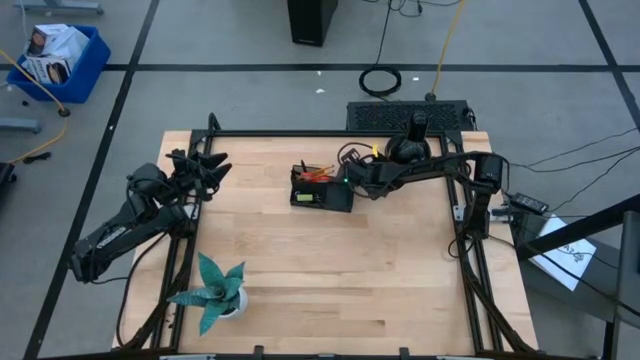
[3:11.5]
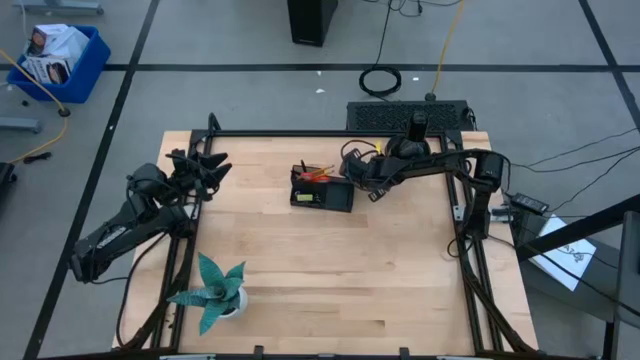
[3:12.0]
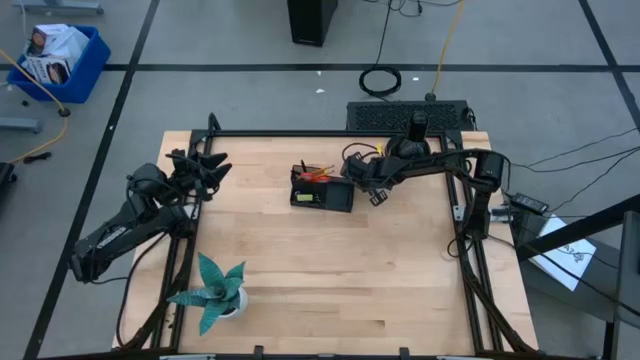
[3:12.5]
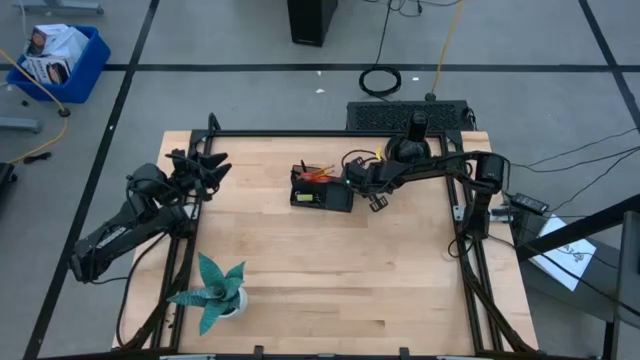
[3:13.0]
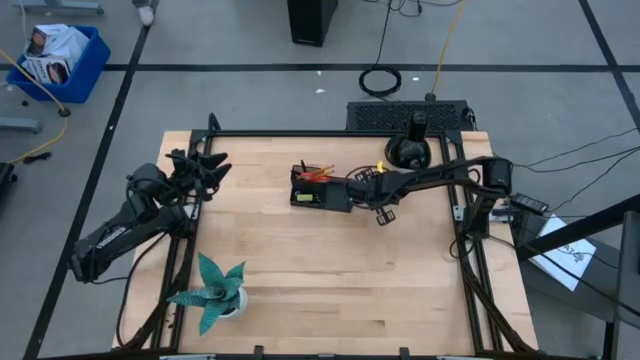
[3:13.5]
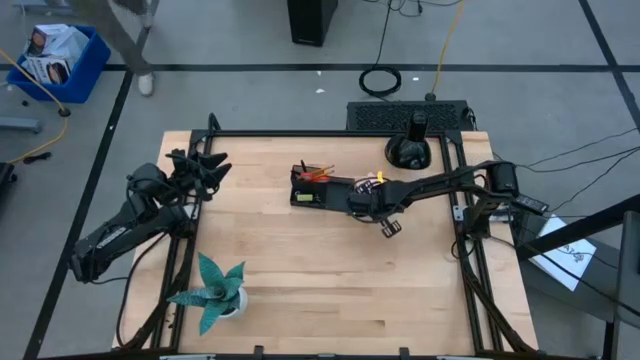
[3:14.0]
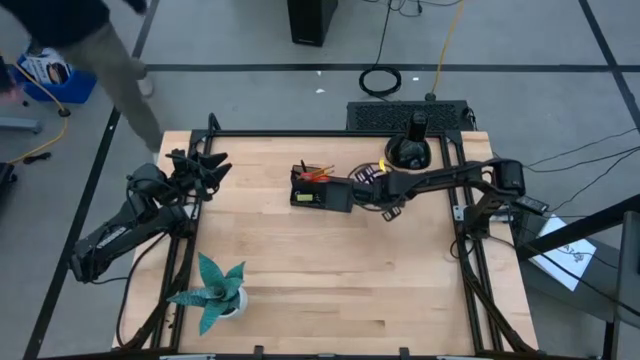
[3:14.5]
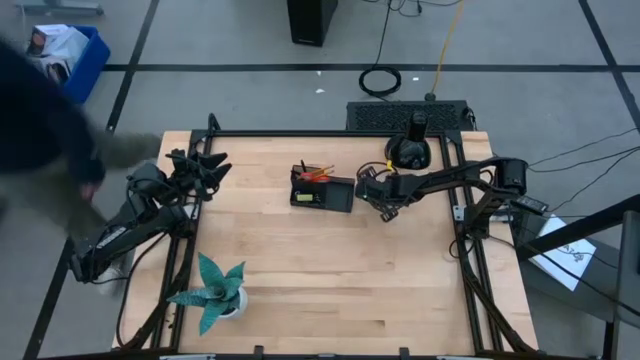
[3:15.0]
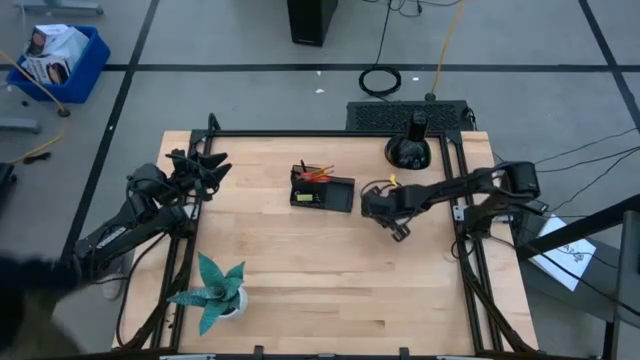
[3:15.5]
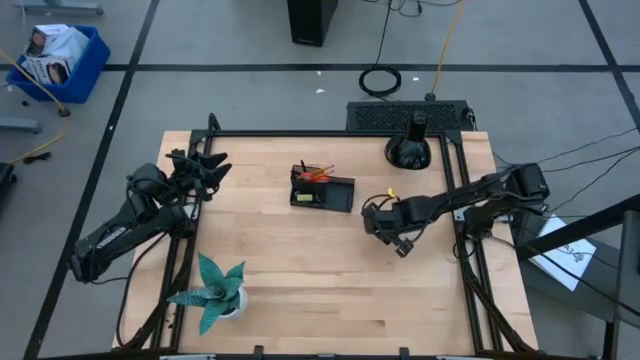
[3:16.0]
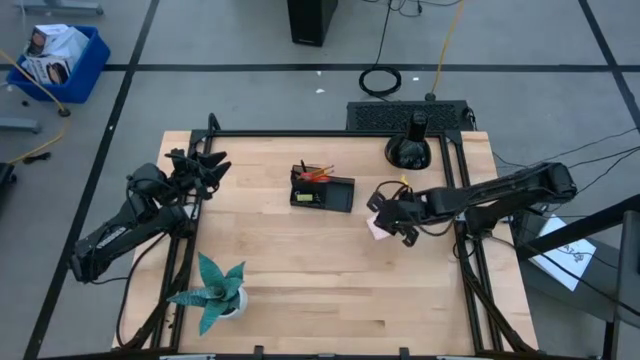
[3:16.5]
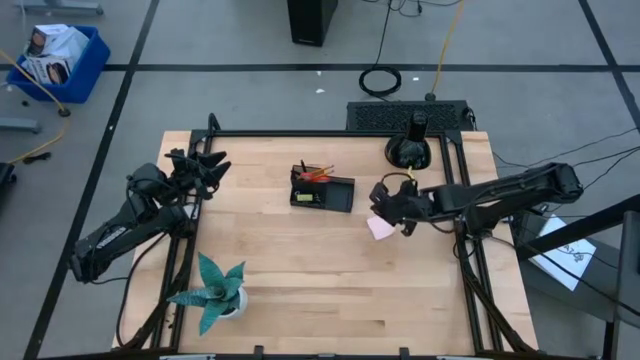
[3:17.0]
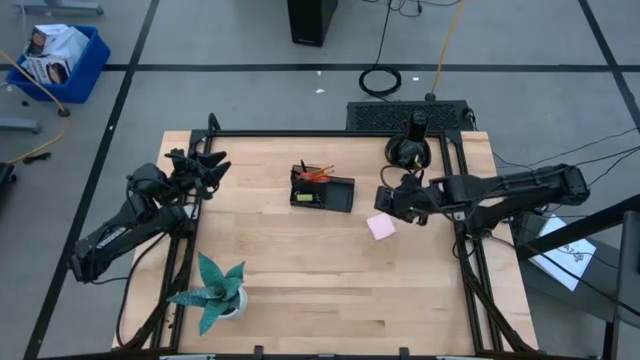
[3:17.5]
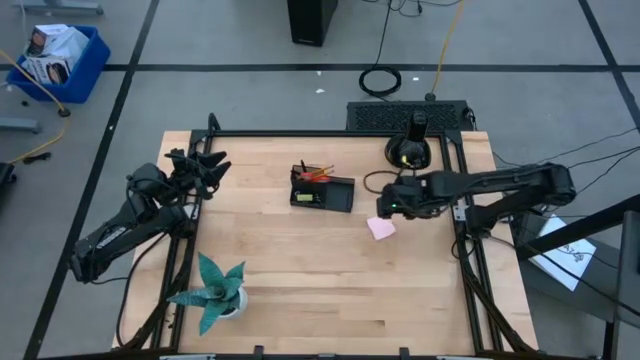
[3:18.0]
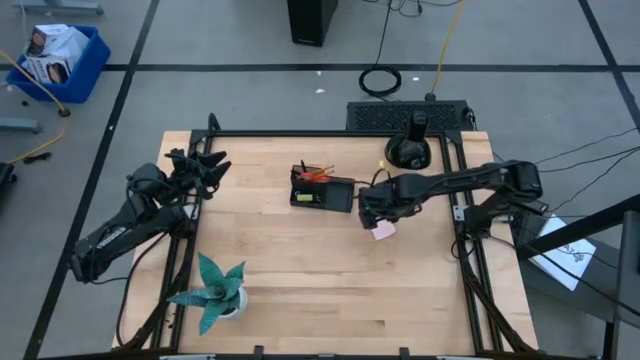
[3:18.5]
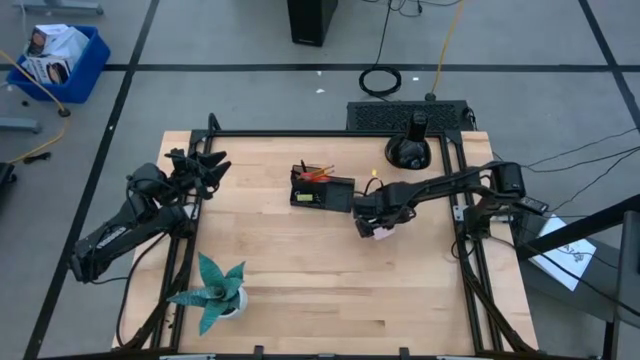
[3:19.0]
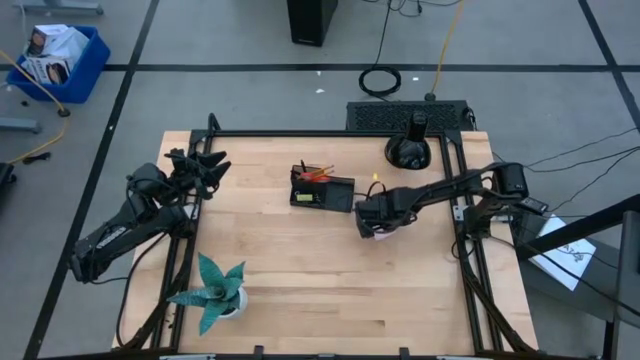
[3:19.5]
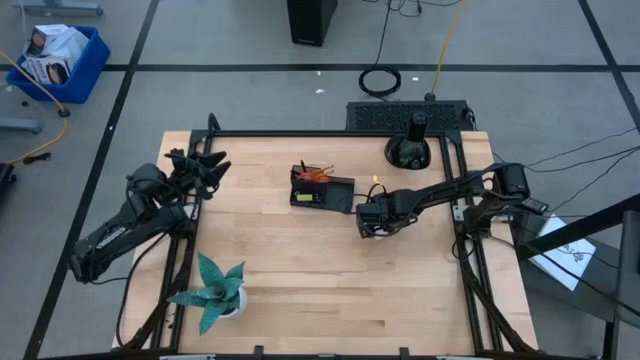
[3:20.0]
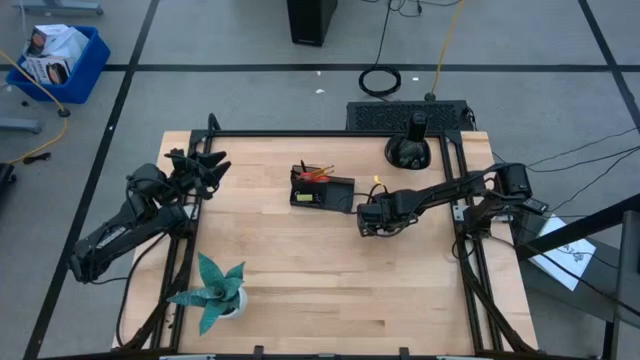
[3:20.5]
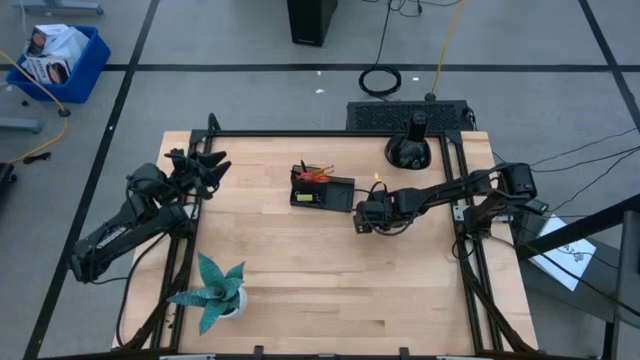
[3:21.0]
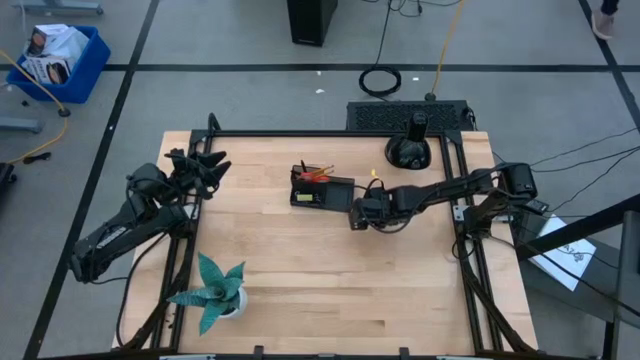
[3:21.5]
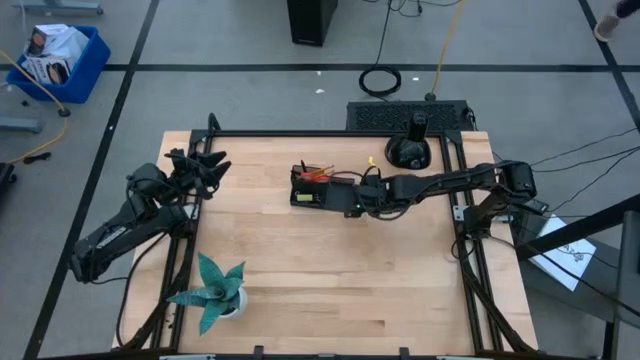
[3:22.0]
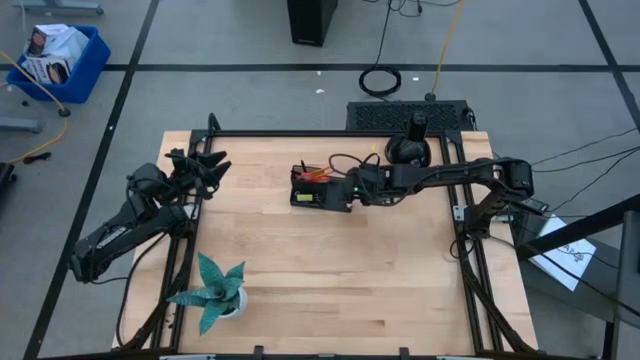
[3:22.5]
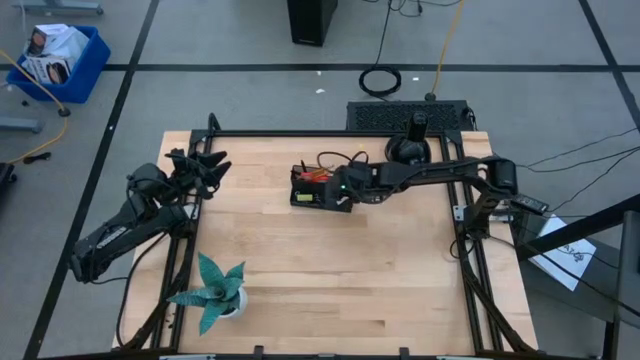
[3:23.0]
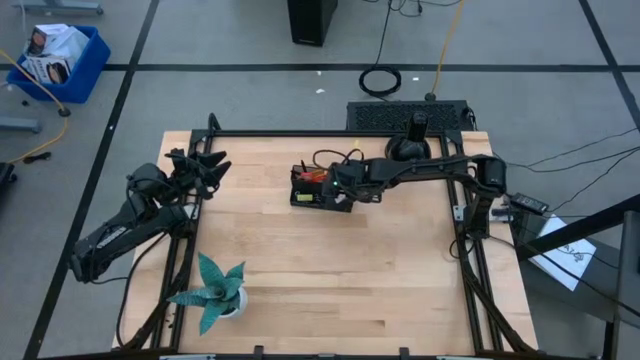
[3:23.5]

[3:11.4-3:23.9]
Task: Pick and place office supplies into organizer
Put the pink sticky notes into the black desk organizer

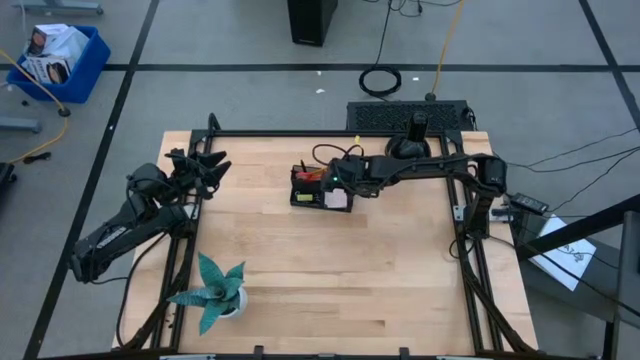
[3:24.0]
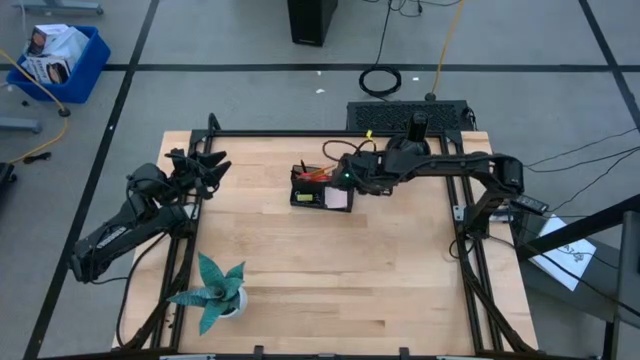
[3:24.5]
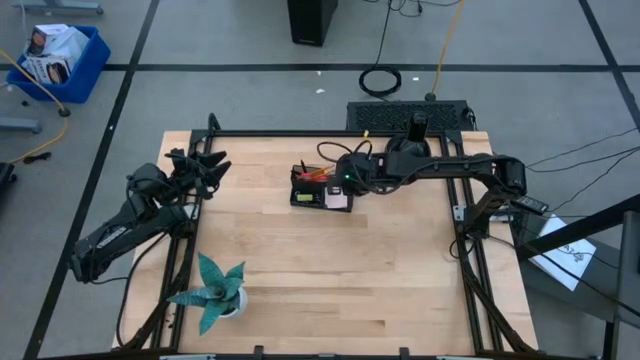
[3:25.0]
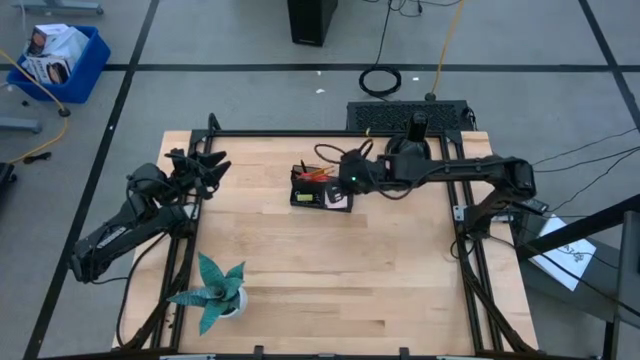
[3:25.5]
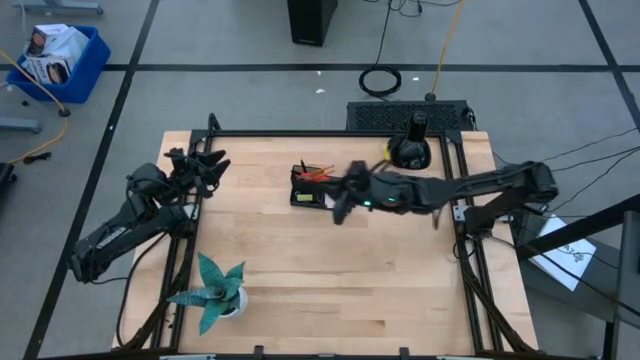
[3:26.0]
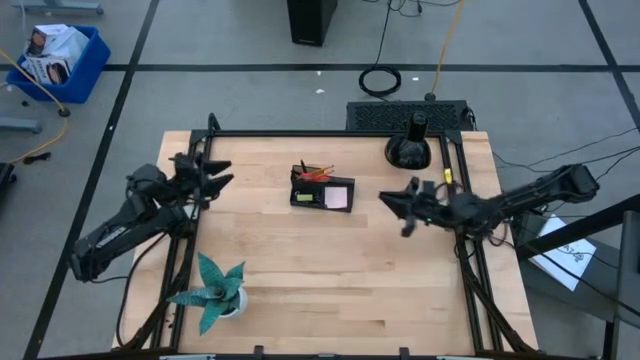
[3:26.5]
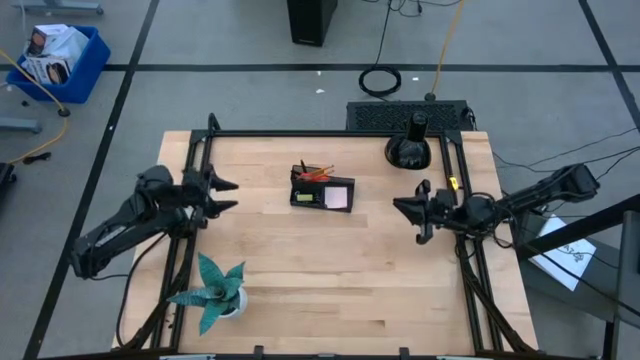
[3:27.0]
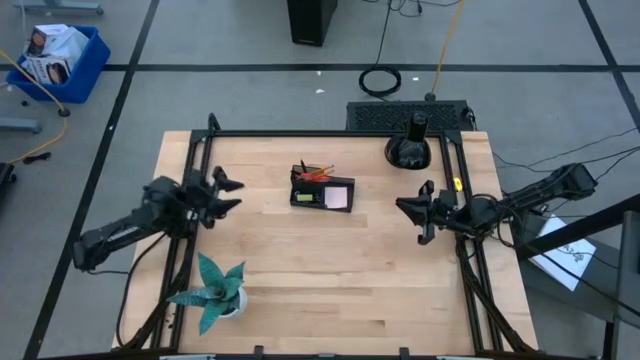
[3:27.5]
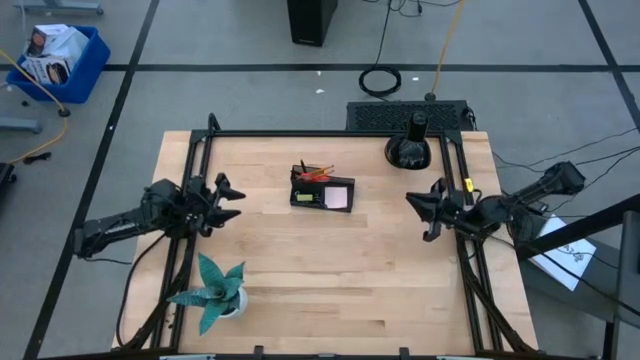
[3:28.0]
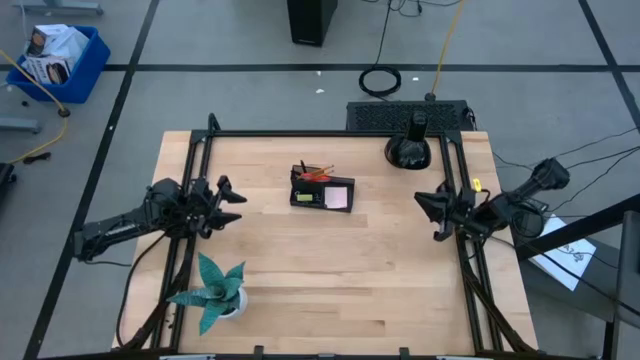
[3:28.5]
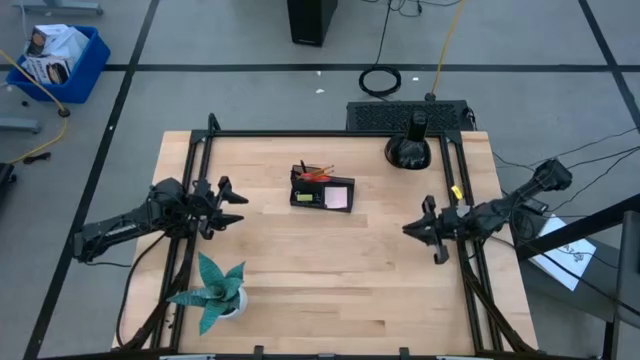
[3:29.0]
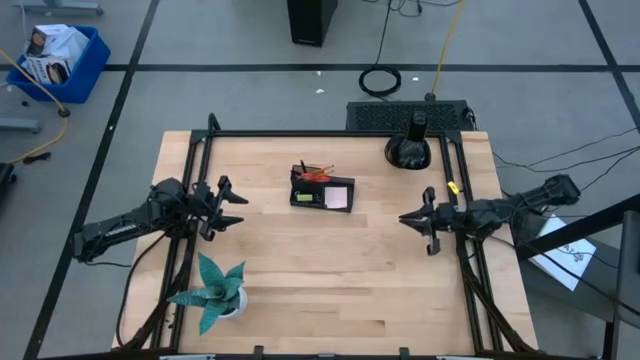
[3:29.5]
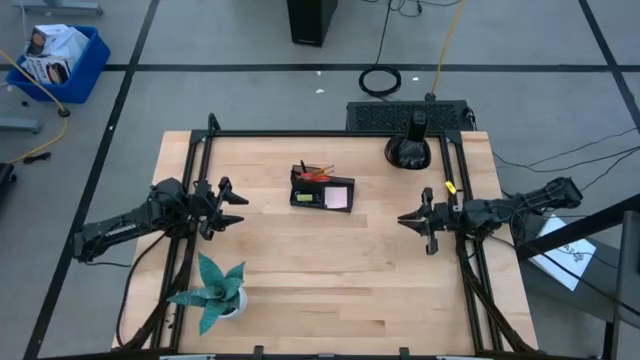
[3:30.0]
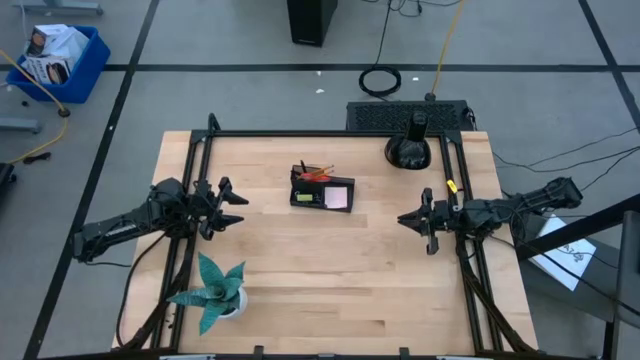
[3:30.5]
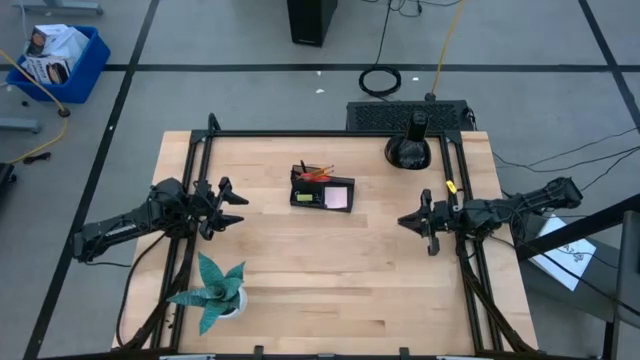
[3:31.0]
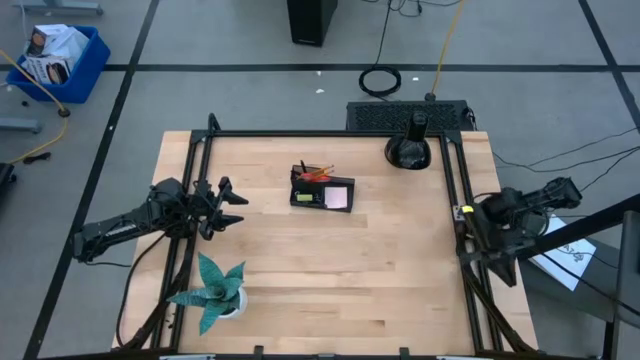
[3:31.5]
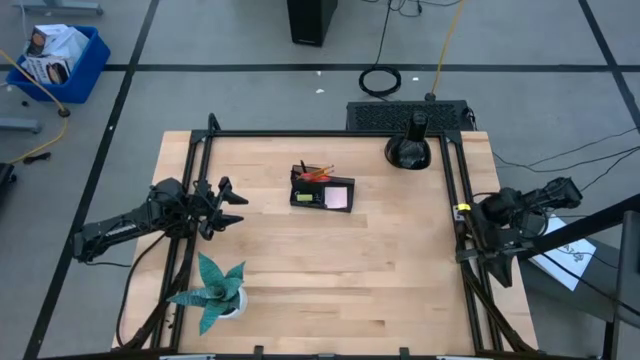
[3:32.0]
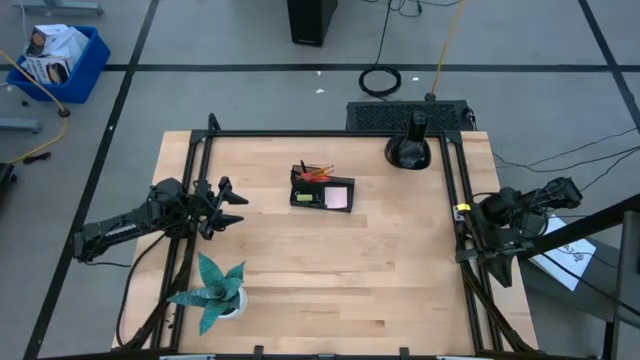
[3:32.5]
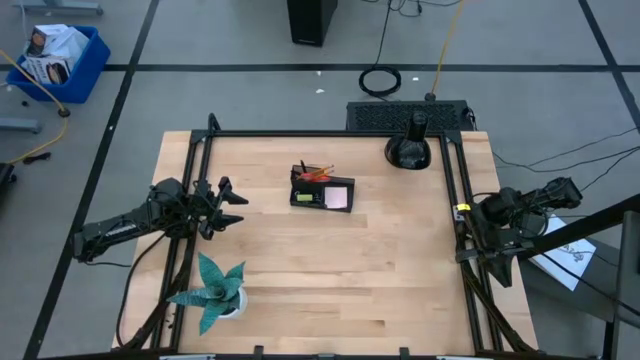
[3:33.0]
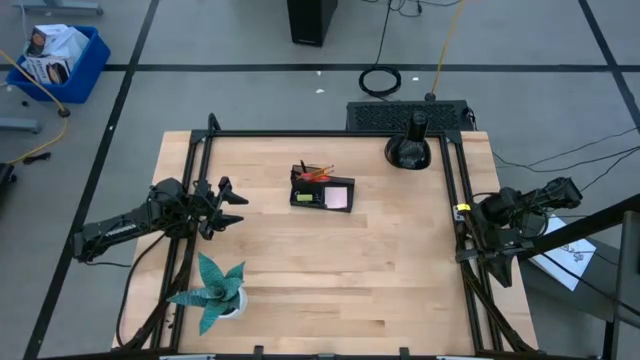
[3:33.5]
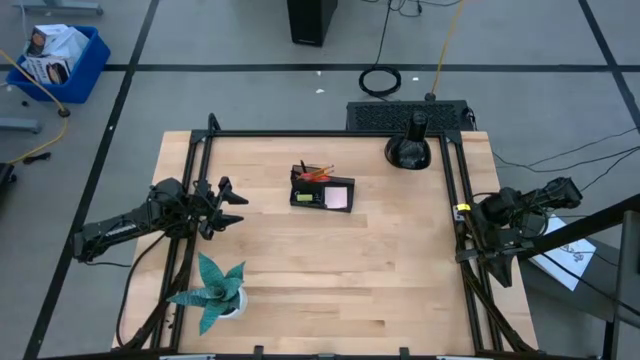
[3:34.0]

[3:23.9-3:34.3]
Return to Home Position
